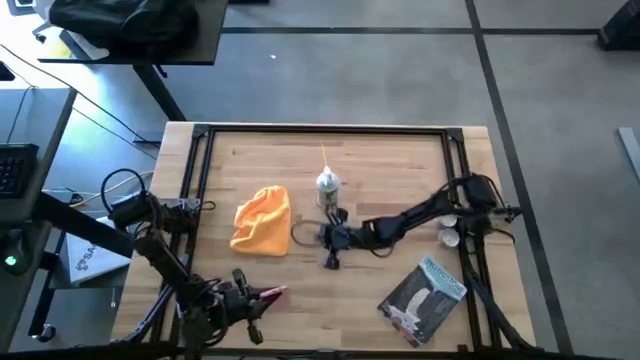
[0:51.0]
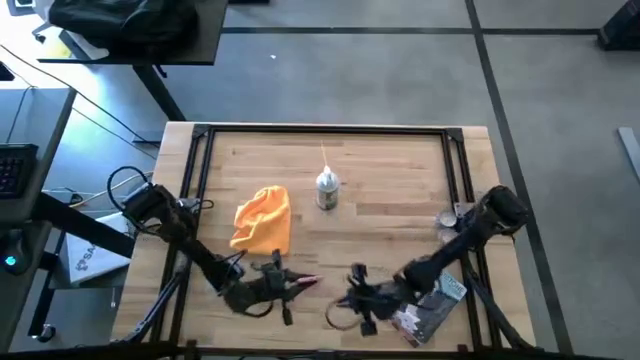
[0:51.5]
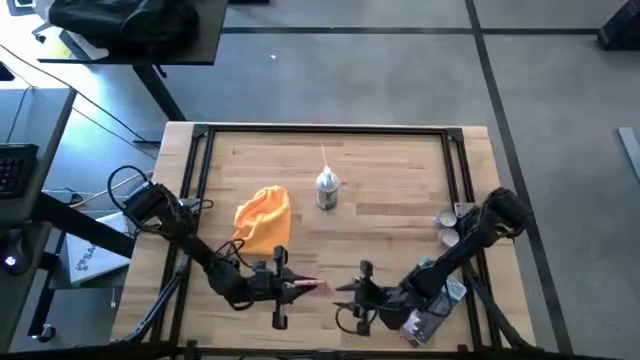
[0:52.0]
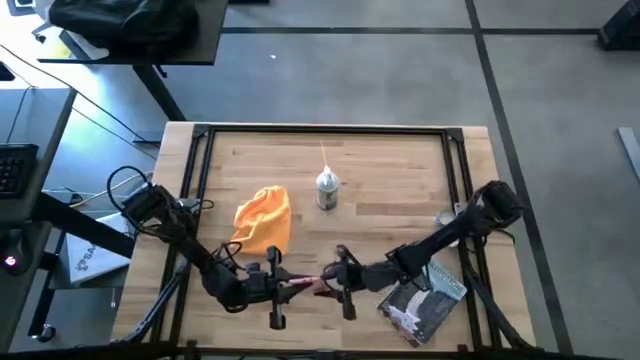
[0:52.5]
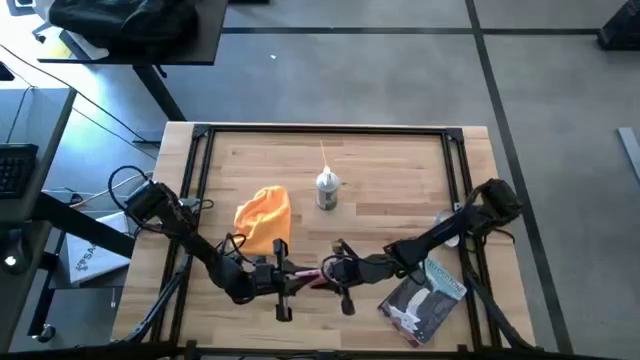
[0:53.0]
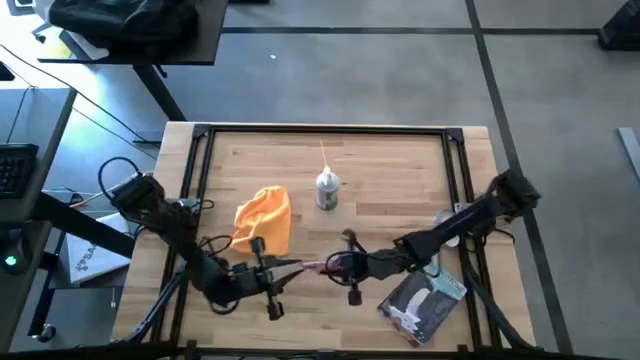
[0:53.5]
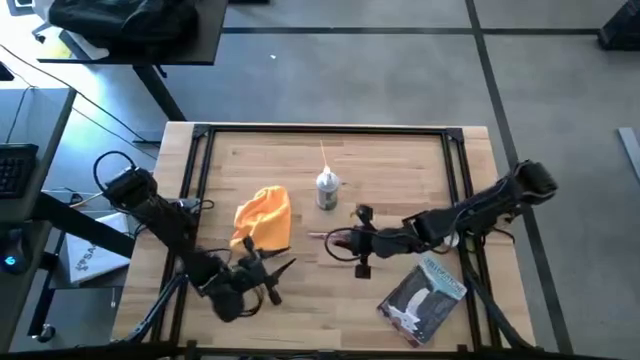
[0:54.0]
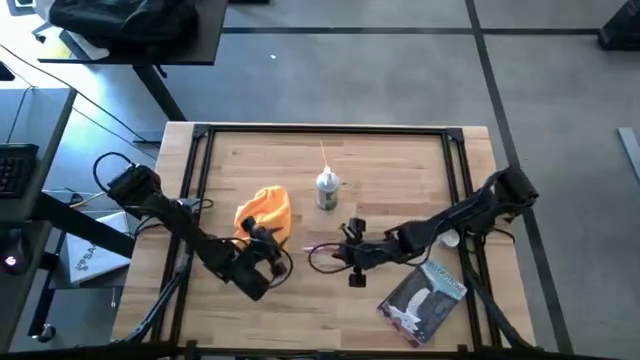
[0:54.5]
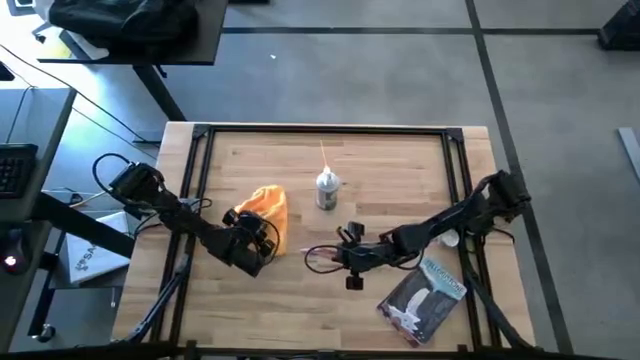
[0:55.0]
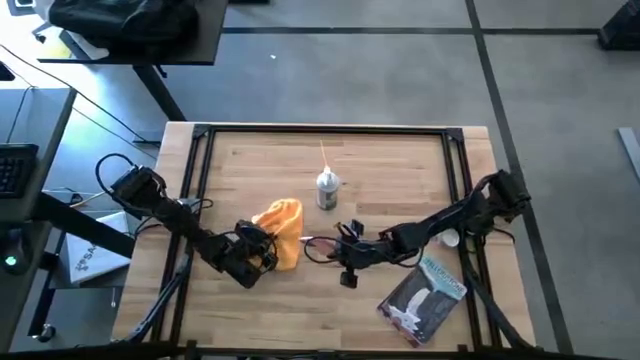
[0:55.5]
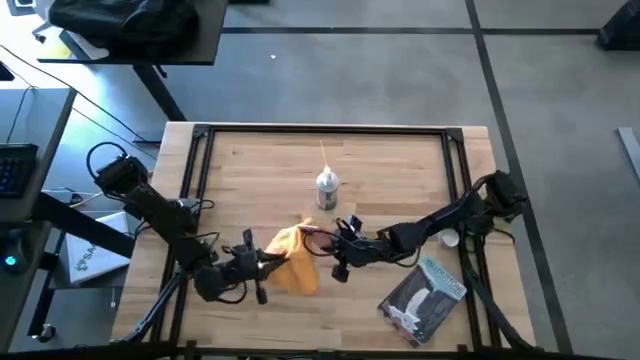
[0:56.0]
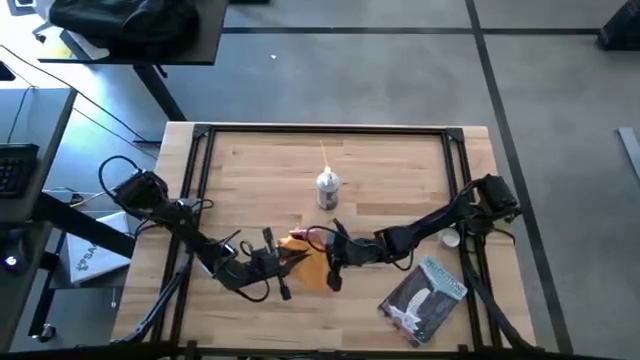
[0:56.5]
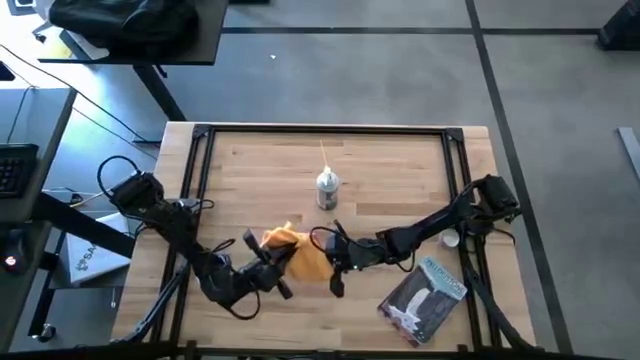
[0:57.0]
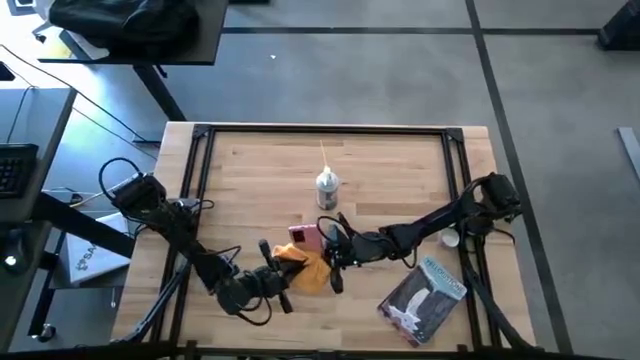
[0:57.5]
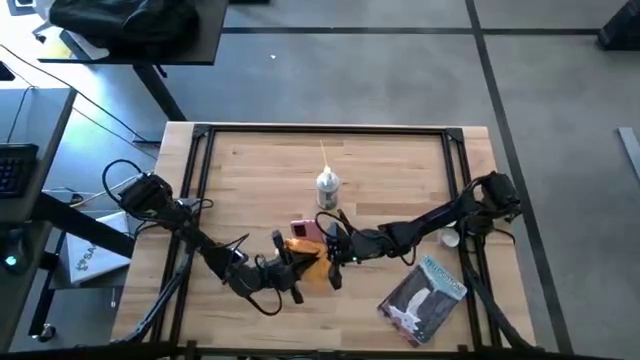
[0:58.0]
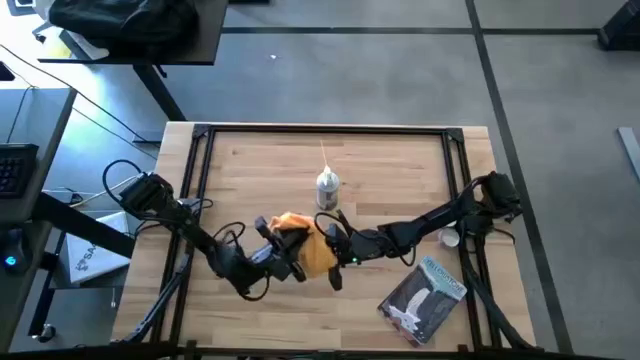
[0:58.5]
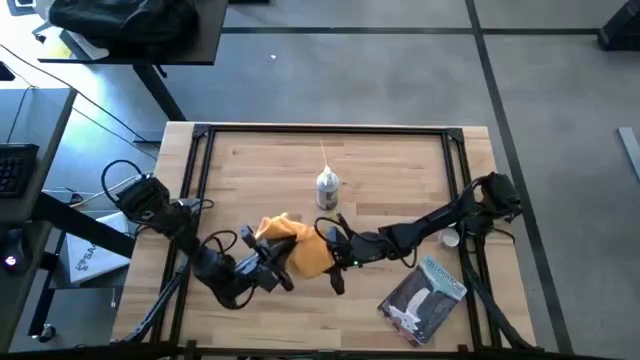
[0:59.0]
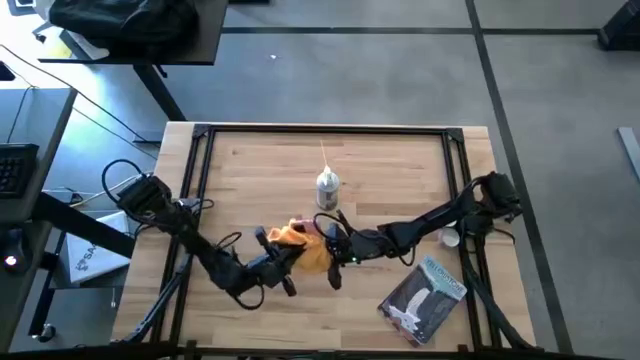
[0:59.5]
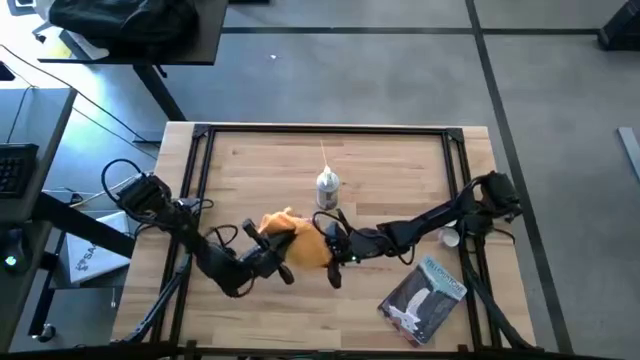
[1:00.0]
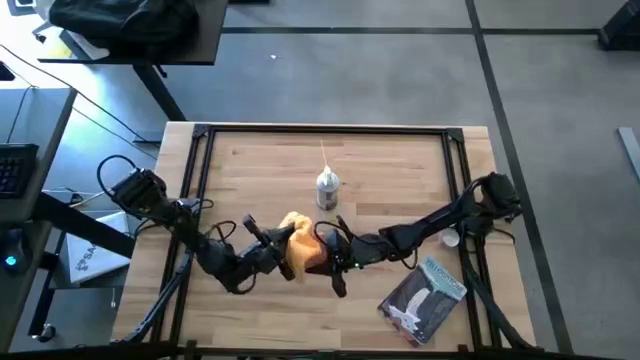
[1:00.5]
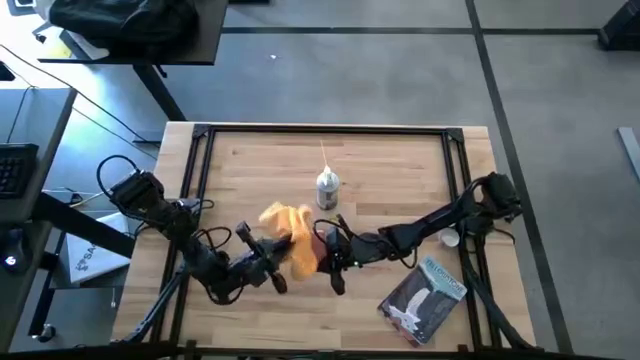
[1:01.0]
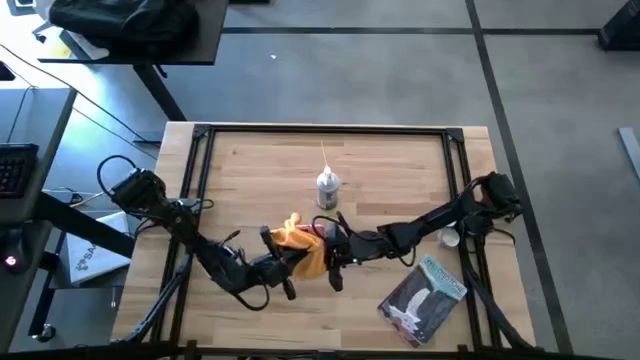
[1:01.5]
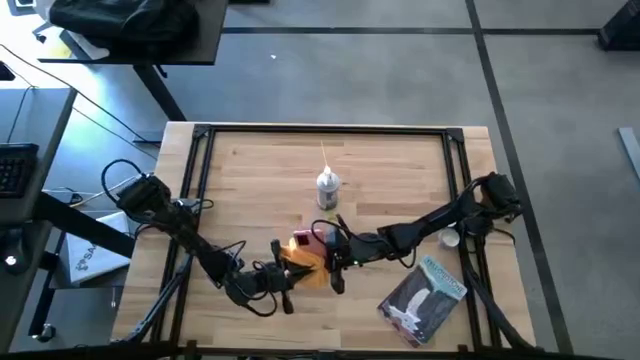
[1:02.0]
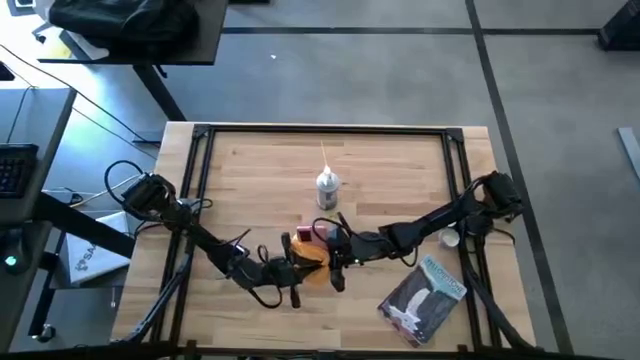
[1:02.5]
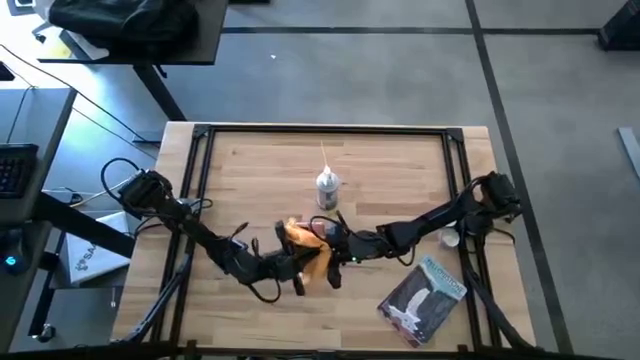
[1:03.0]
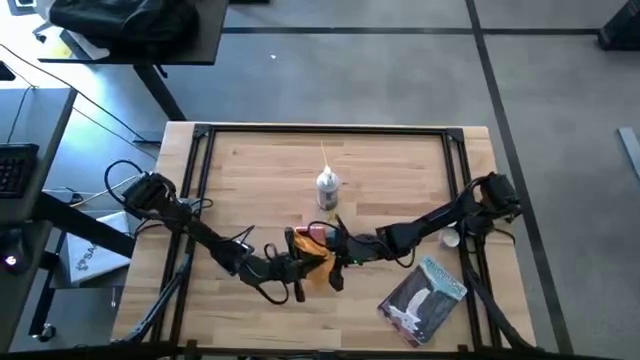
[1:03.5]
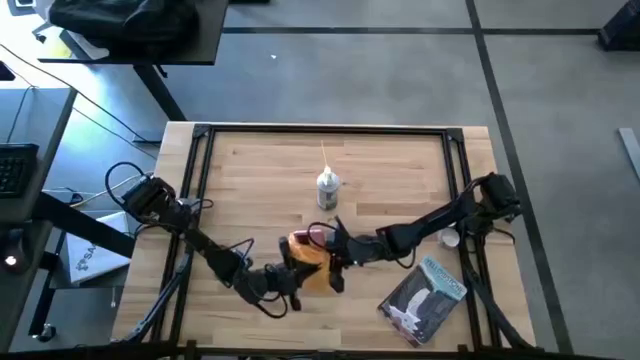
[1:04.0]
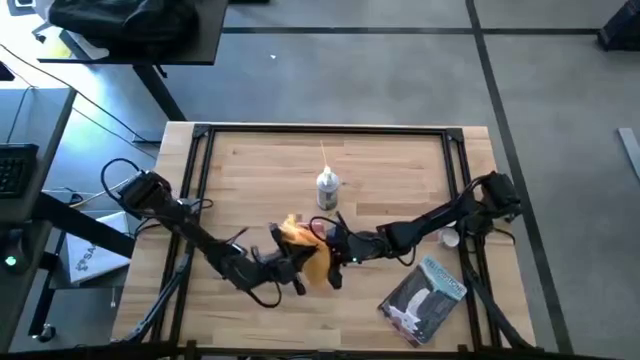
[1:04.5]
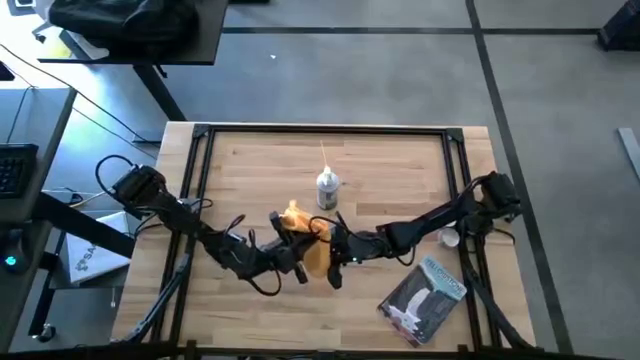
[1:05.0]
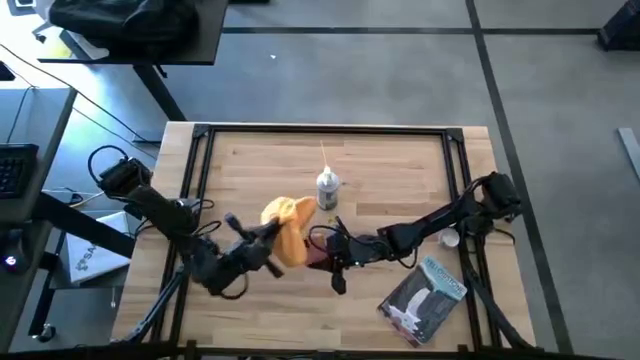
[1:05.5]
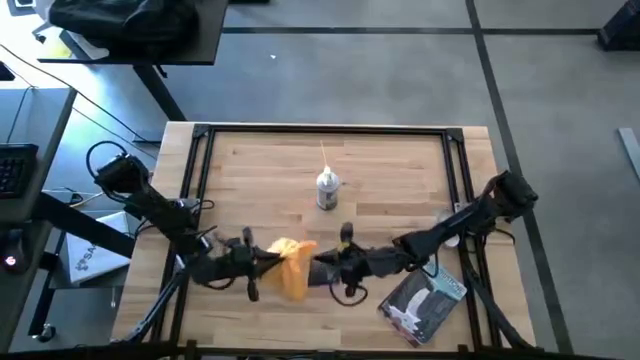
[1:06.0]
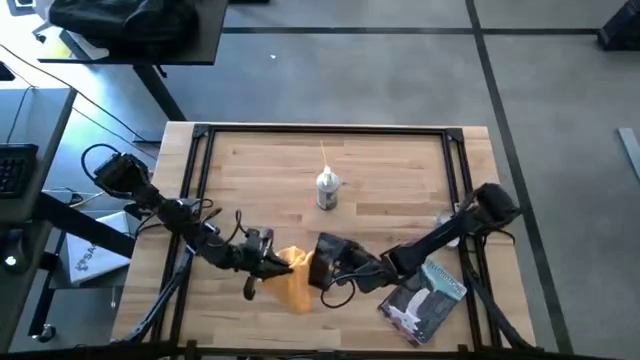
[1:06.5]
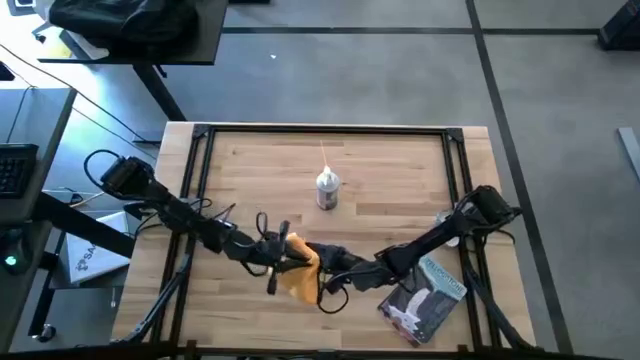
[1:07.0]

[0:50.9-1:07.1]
Task: Apply microfiber cloth
Wipe the phone with the microfiber towel

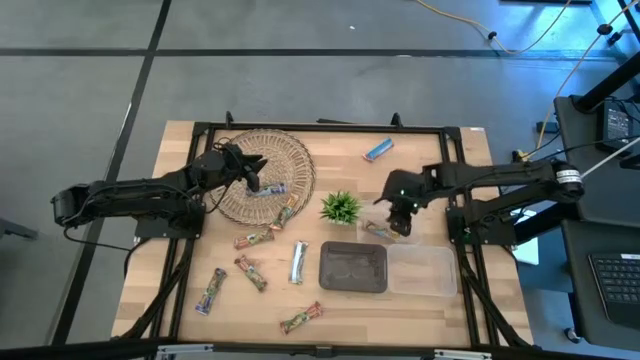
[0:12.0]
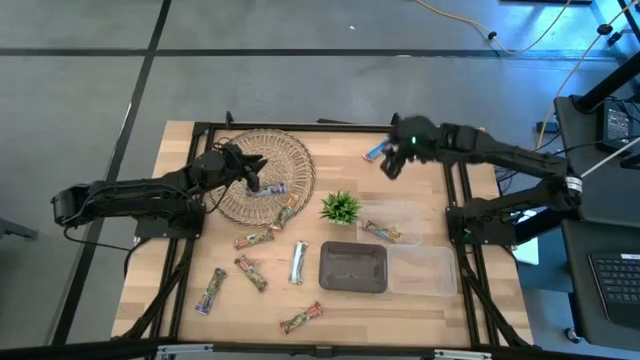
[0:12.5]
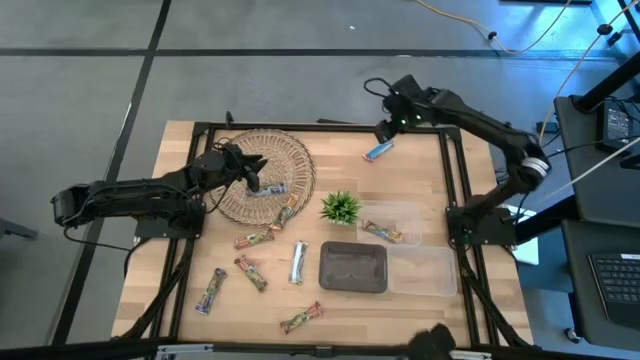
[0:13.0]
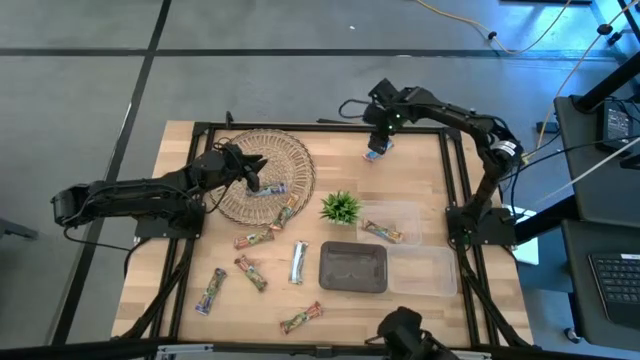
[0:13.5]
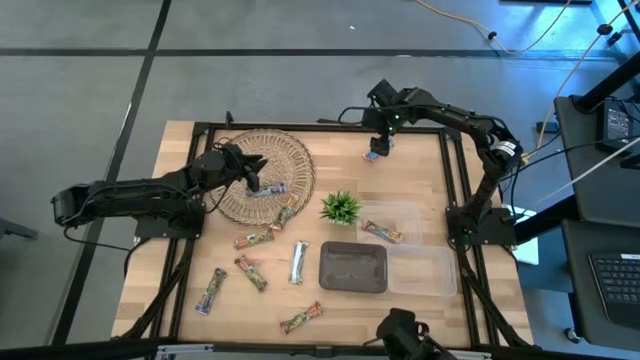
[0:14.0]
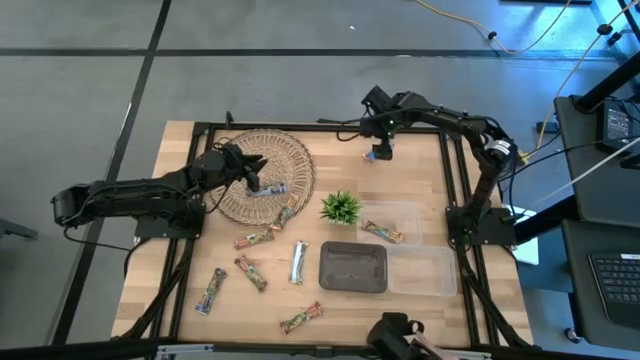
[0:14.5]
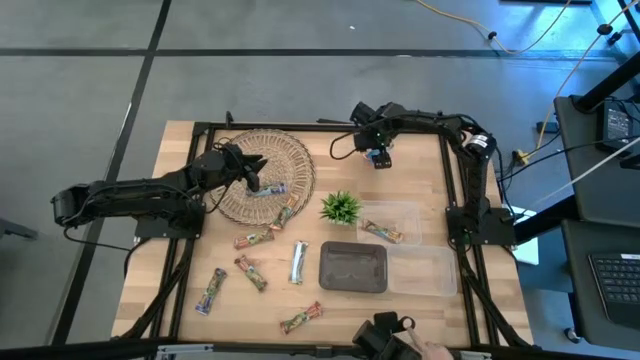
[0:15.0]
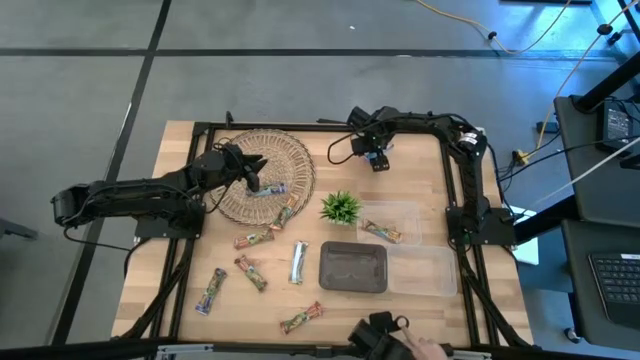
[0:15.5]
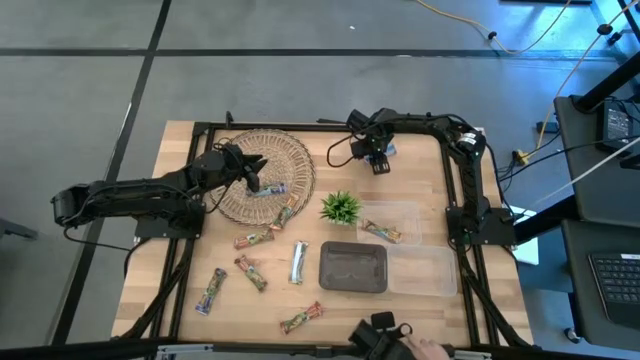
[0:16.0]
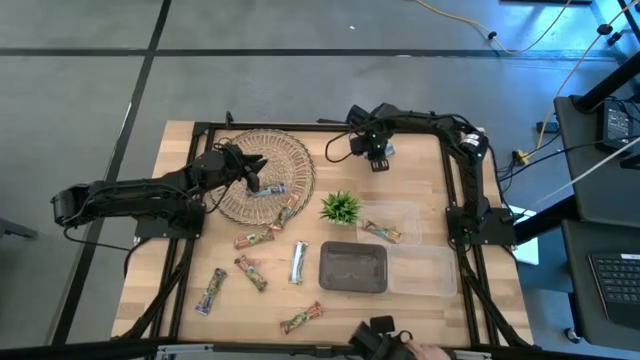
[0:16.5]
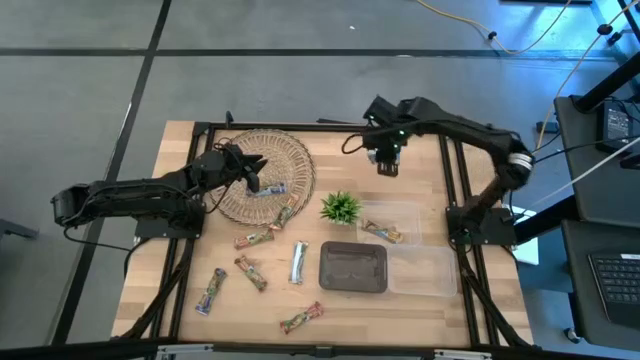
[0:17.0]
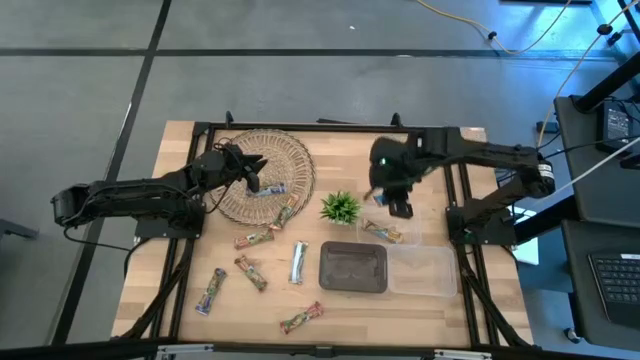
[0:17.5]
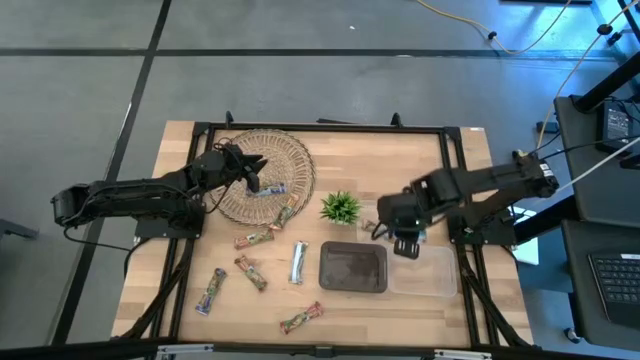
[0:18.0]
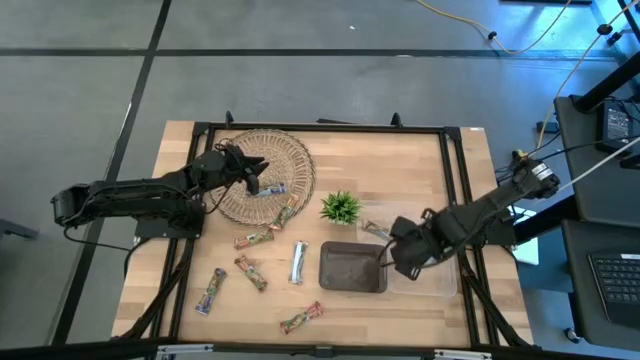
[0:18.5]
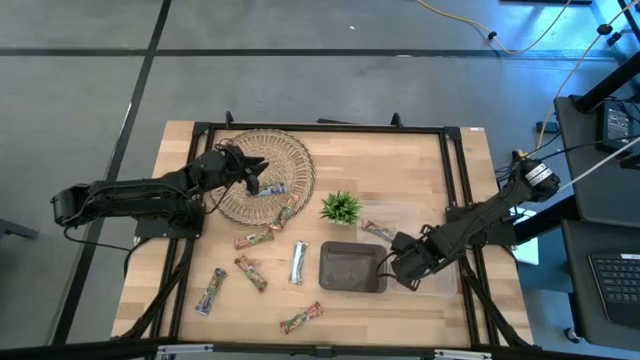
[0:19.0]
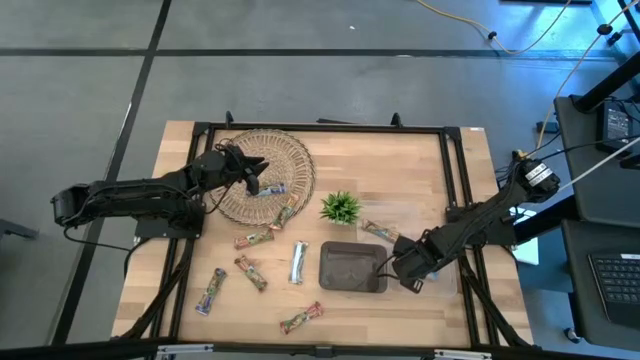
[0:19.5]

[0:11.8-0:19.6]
Task: Pick and place Granola Bars by type
Put the red granola bar into the bottom transparent bin
